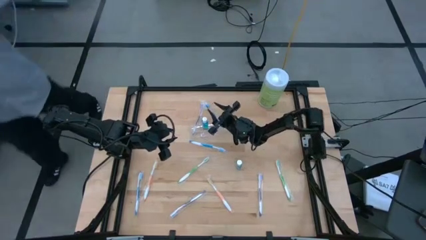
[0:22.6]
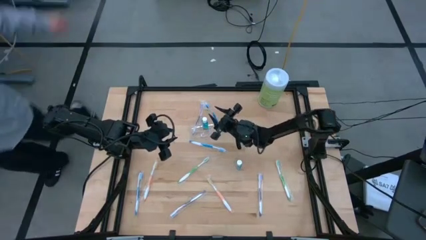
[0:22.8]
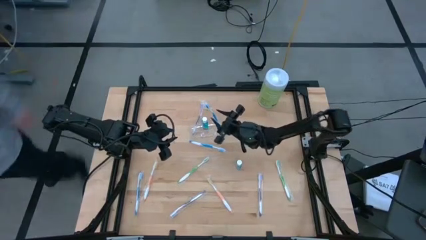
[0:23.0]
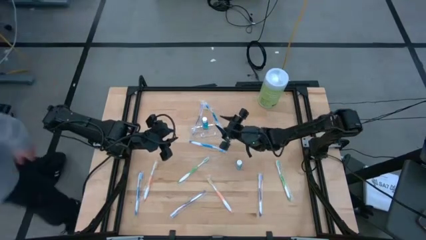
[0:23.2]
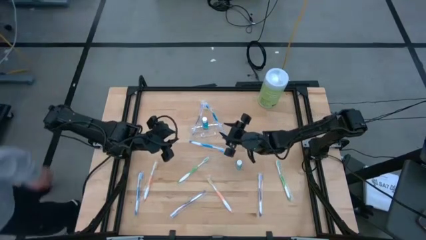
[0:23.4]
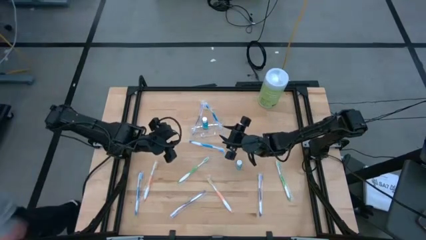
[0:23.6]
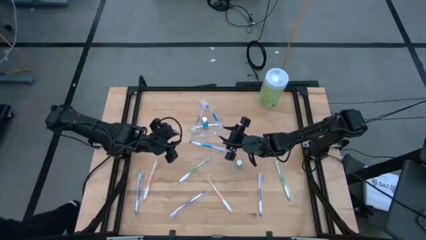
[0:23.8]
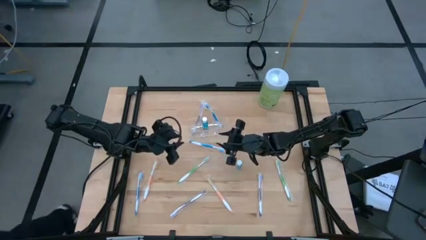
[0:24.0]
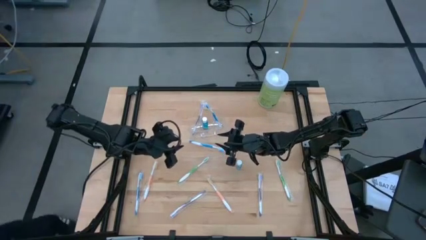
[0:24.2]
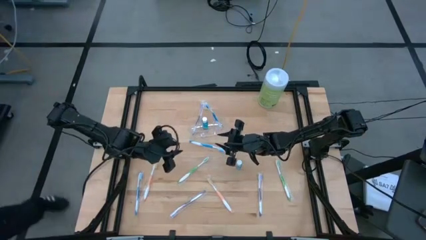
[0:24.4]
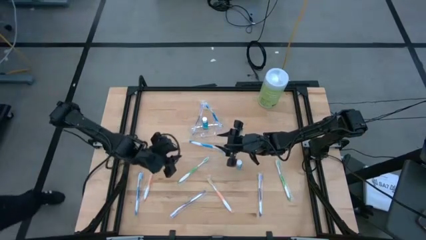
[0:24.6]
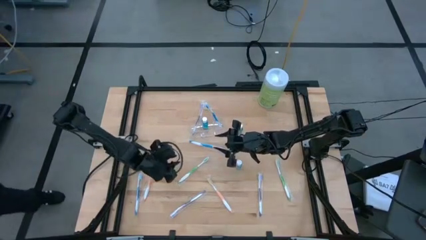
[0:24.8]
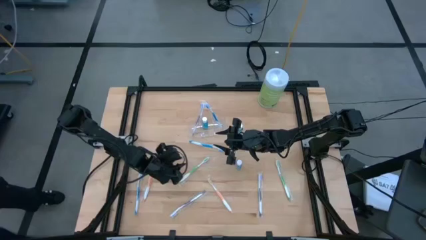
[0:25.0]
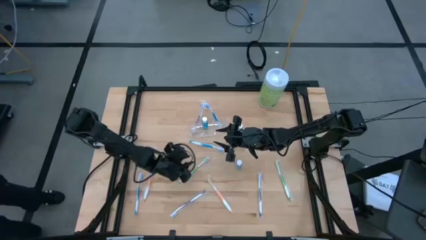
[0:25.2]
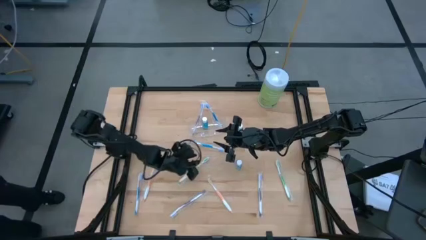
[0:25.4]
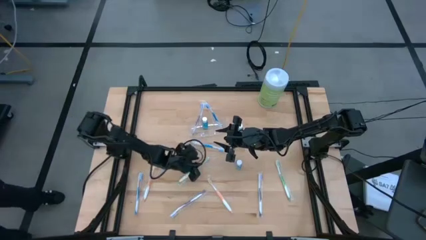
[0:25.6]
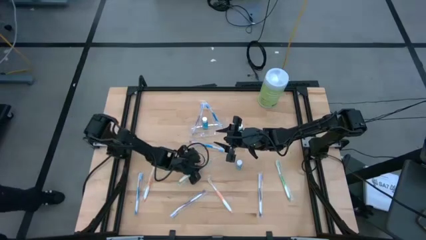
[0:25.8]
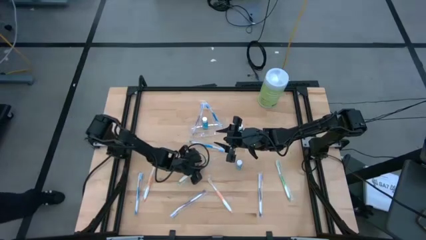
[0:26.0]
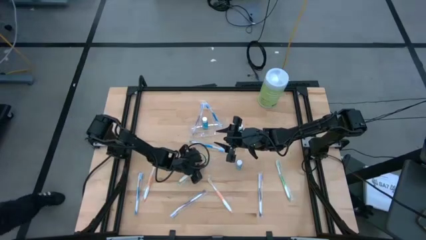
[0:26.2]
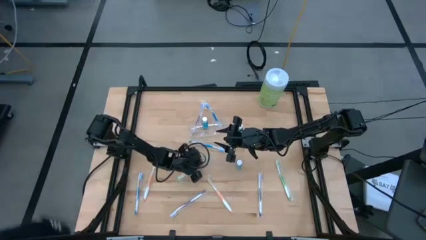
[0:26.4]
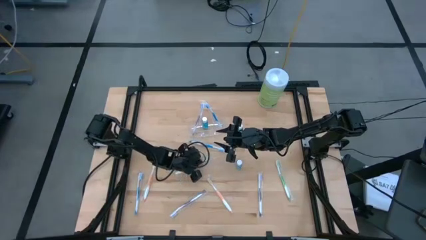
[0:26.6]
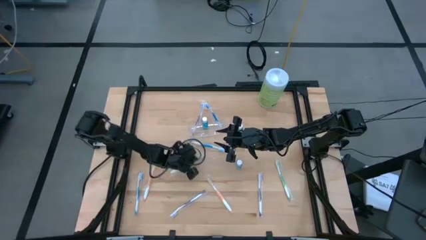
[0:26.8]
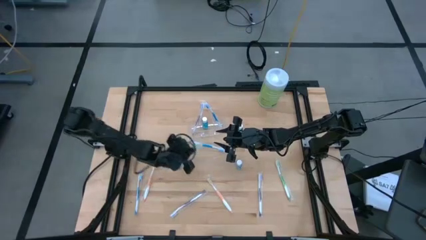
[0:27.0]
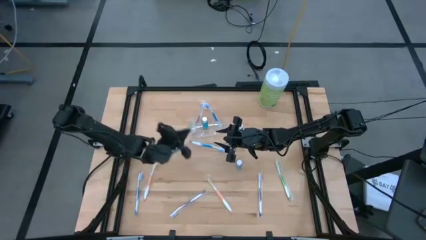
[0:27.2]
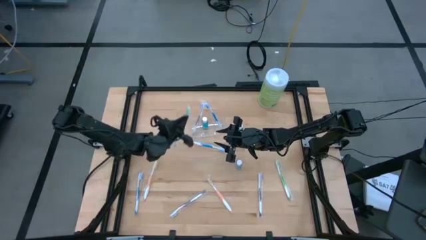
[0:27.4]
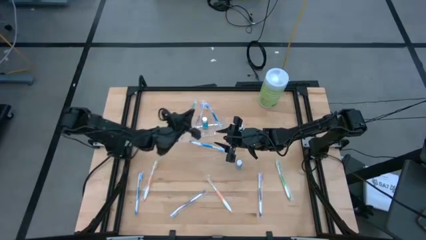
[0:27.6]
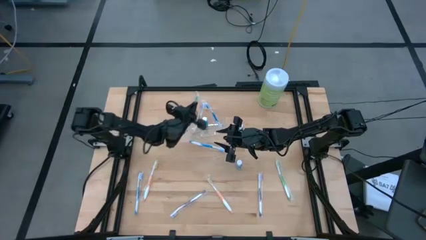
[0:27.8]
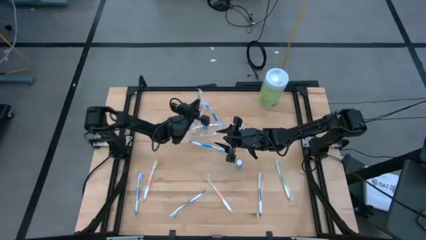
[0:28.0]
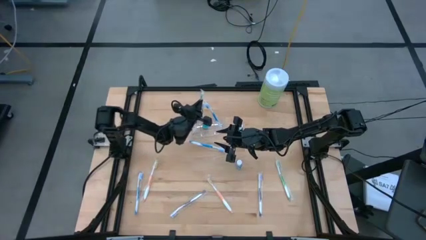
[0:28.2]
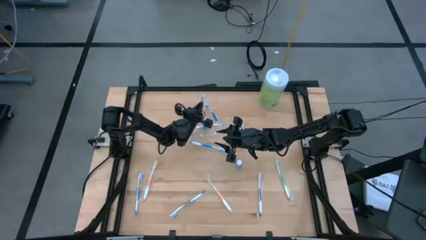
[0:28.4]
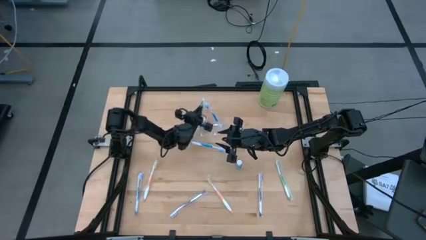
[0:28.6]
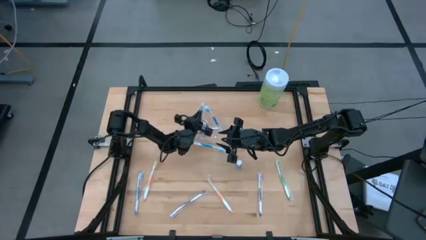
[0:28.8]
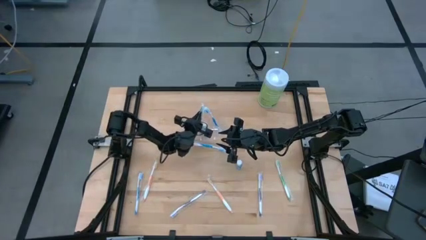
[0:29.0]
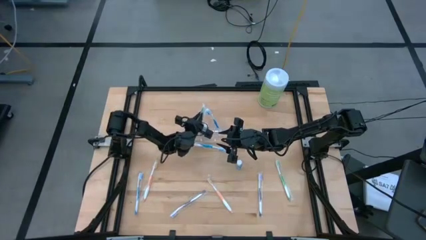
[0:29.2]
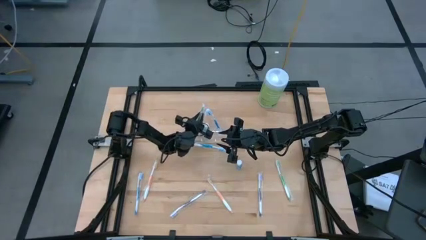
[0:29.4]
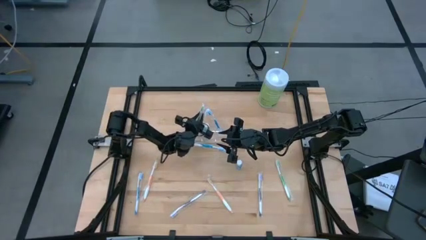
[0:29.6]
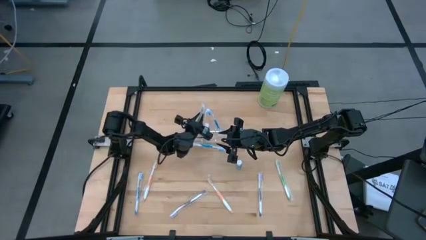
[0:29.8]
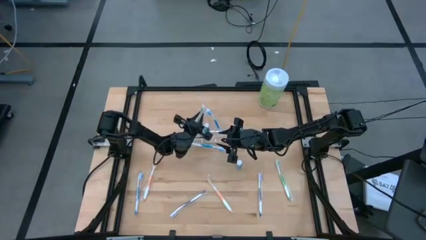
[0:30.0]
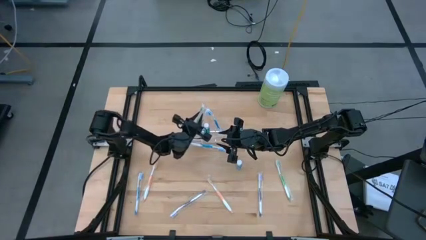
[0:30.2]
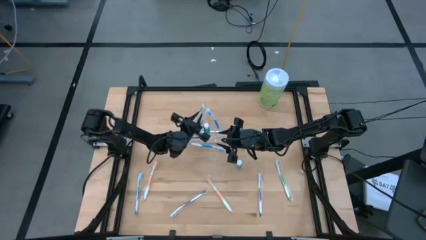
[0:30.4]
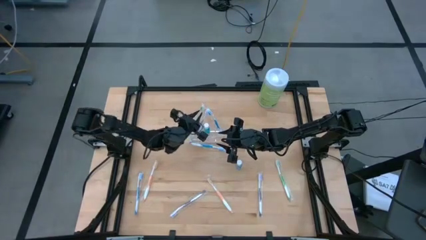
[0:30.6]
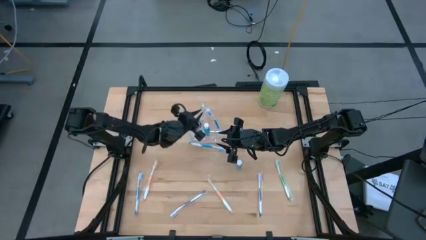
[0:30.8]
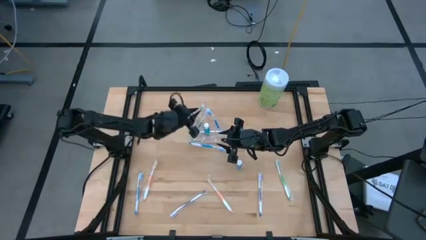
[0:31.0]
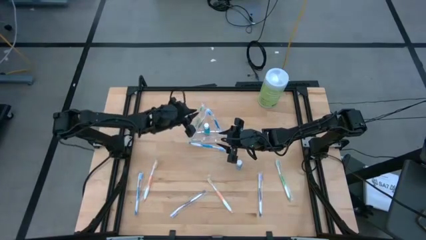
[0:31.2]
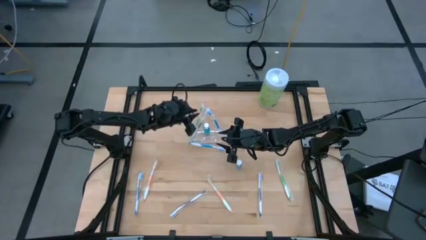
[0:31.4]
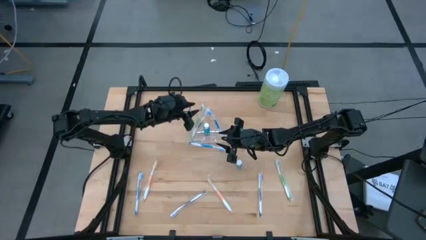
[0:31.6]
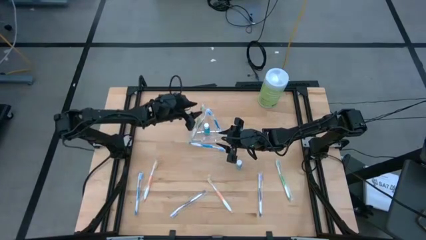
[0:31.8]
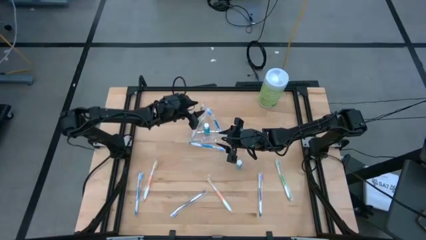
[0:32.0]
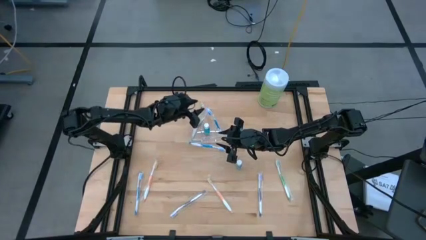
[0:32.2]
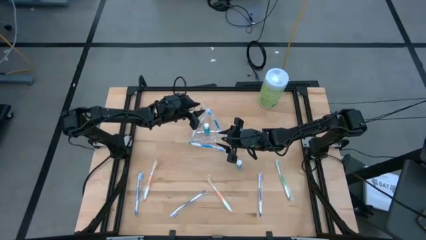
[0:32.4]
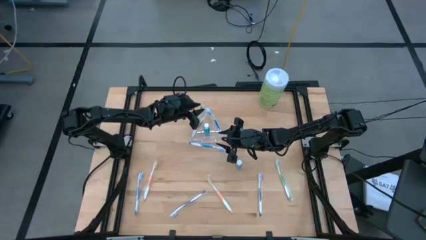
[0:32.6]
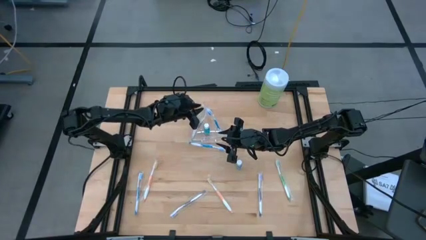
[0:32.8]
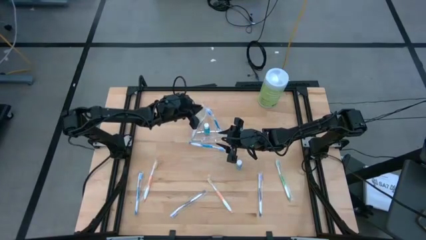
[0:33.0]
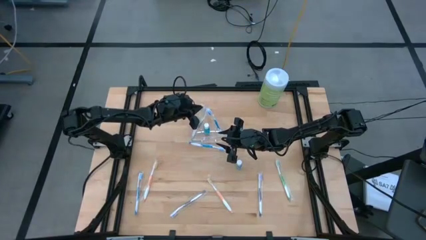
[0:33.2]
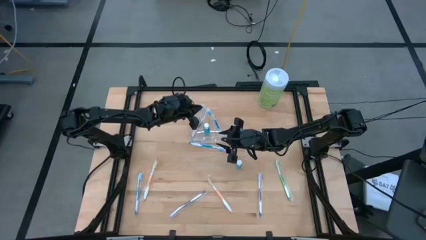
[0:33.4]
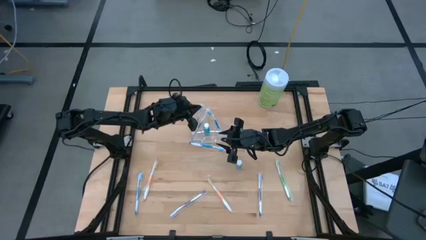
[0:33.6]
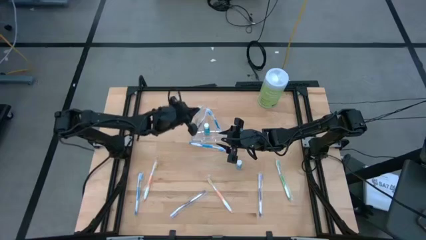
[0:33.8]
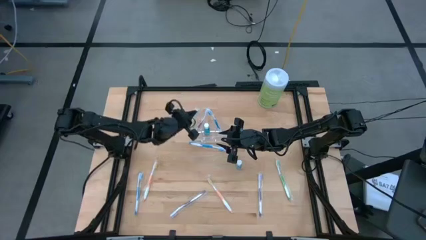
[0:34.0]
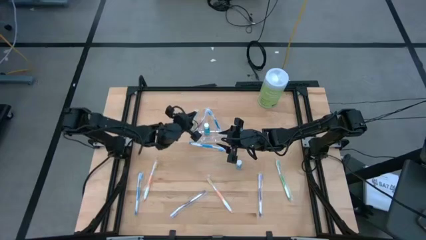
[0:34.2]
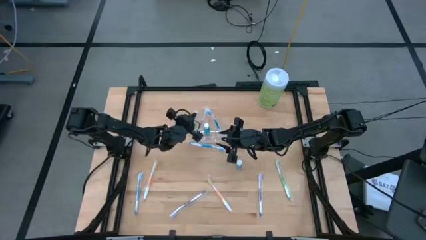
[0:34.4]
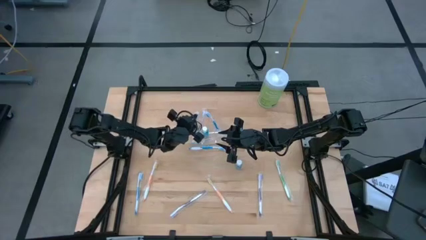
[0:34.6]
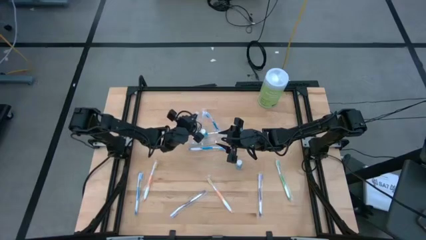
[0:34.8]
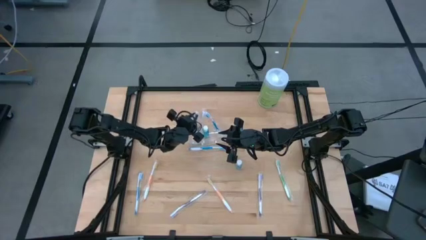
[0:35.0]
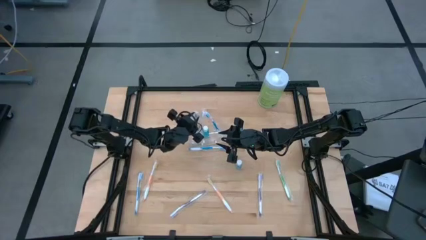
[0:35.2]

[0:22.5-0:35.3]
Task: Pick & Place toothbrushing station
Put the left green toothbrush into the transparent organizer

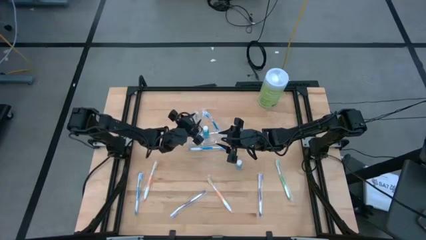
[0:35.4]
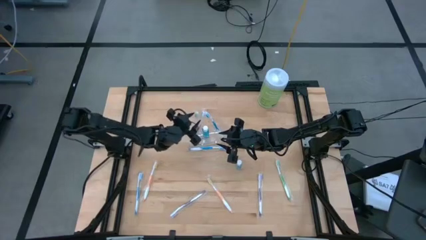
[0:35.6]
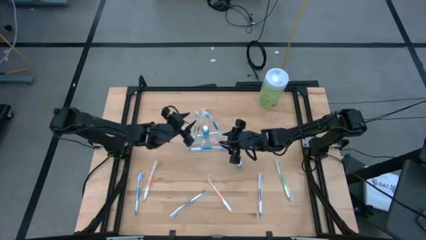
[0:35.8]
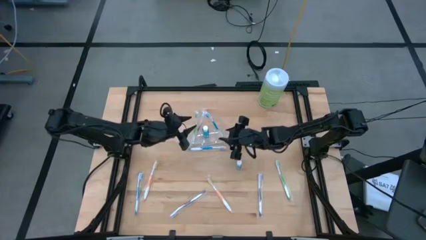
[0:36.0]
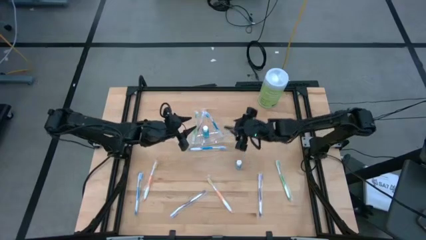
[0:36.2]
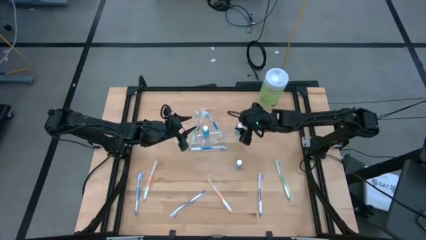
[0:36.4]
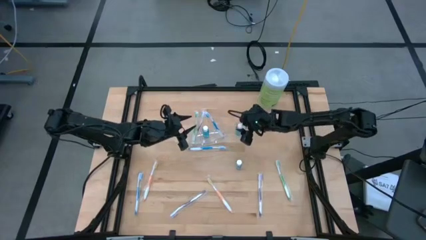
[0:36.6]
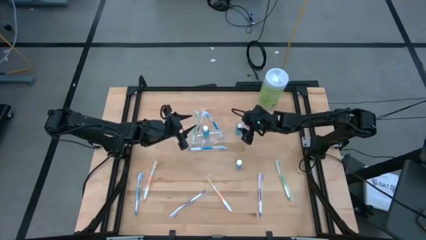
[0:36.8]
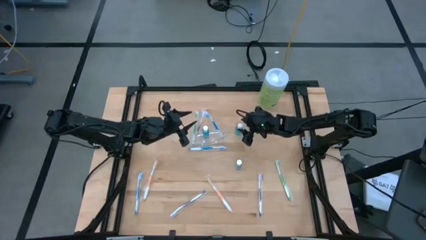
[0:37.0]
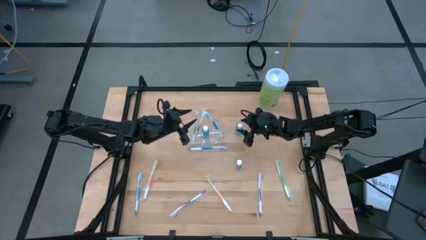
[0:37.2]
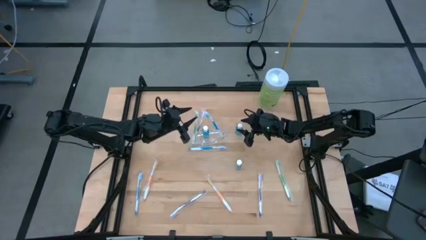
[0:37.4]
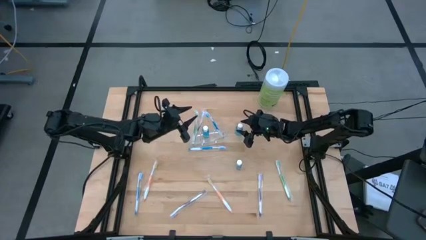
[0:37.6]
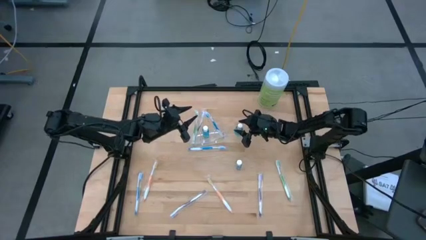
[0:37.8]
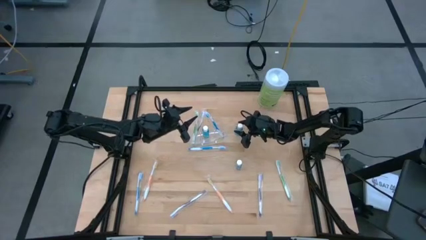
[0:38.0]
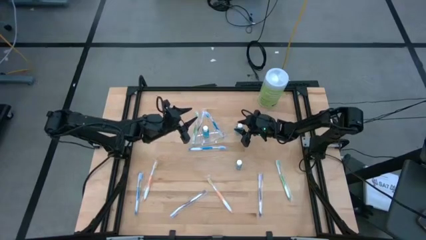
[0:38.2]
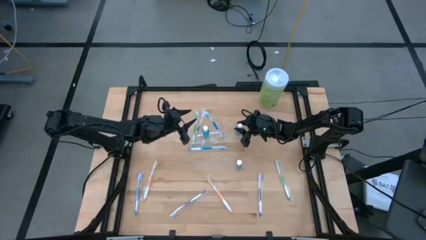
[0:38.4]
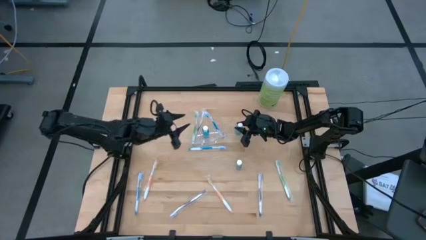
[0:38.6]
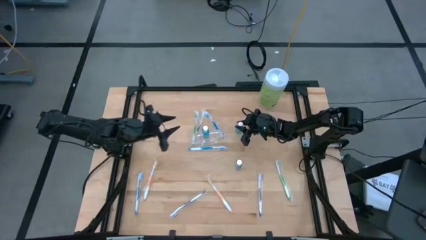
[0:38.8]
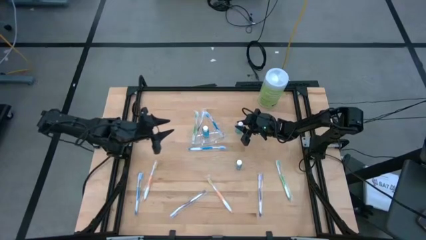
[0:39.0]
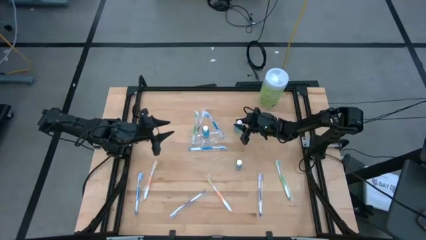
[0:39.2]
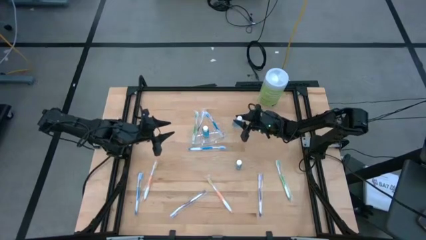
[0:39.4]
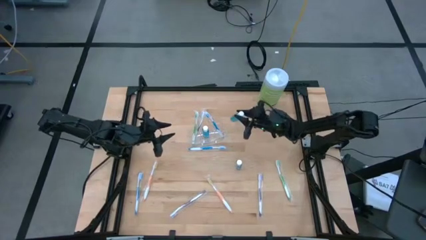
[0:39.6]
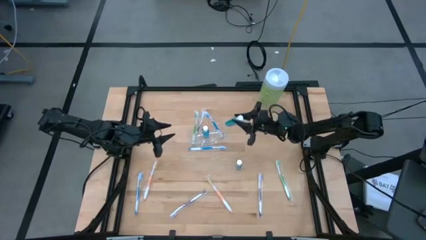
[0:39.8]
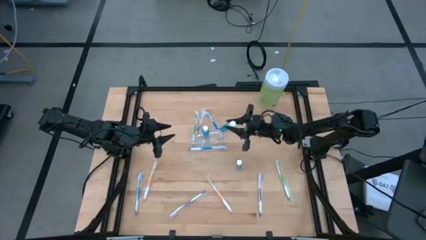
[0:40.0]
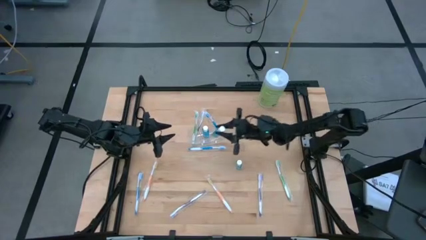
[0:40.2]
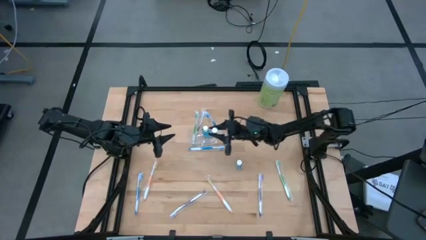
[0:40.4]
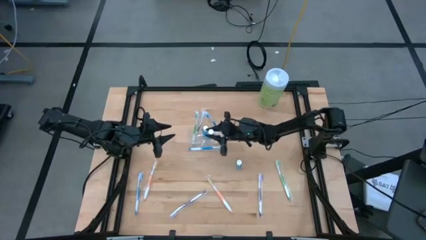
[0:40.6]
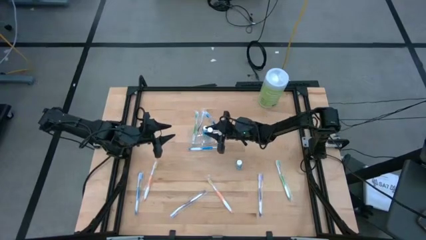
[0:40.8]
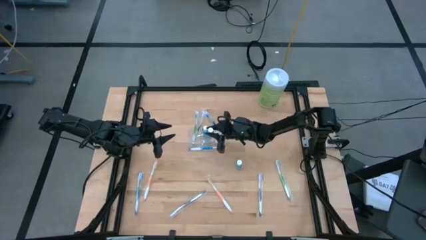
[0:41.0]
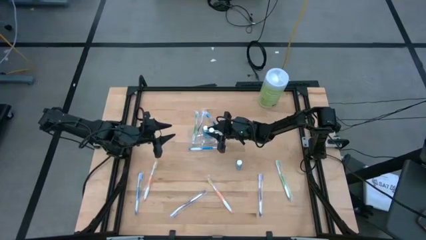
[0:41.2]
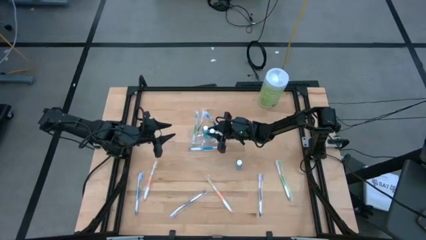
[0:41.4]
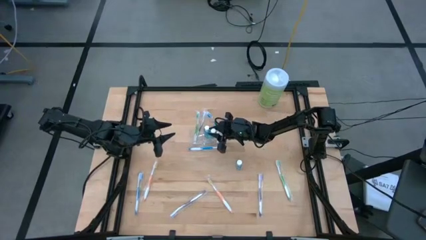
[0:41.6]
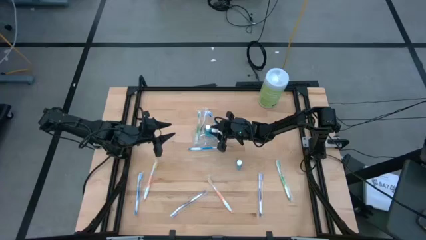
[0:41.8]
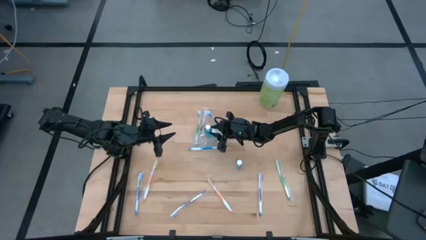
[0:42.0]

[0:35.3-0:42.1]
Put the top mouthwash into the transparent organizer
